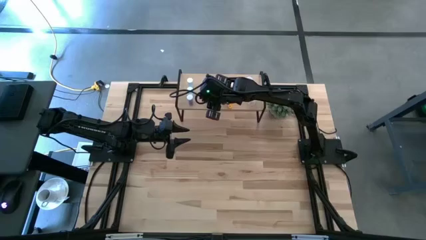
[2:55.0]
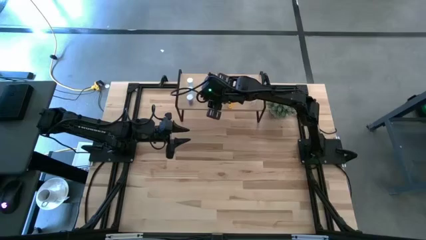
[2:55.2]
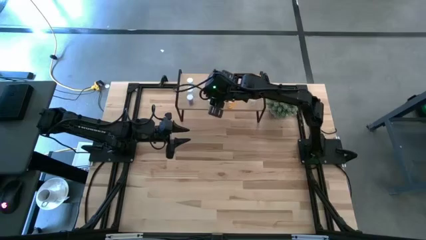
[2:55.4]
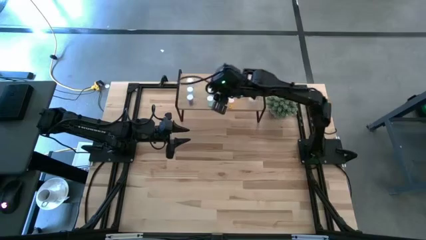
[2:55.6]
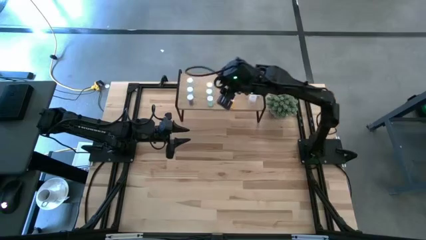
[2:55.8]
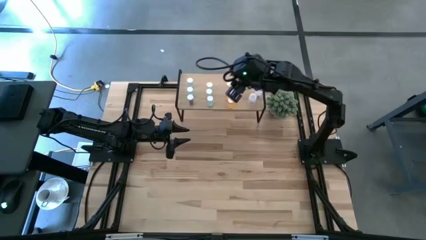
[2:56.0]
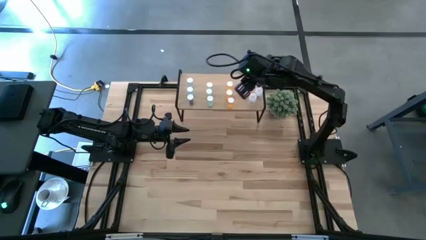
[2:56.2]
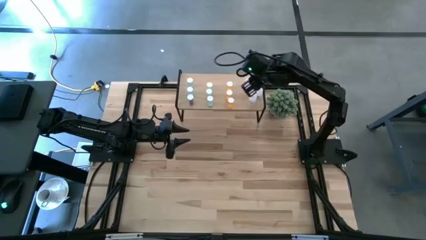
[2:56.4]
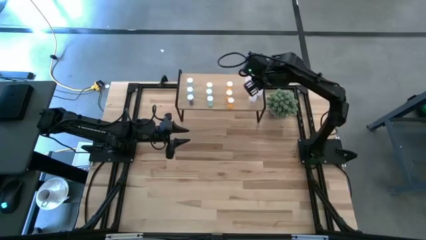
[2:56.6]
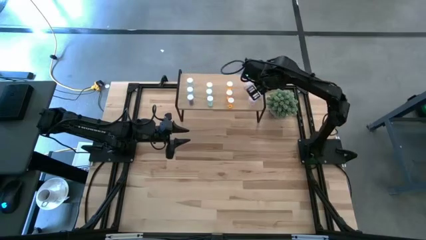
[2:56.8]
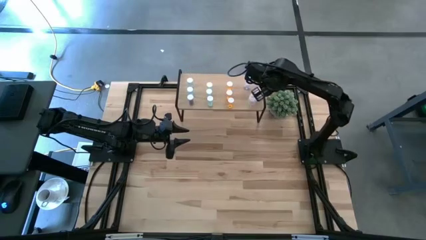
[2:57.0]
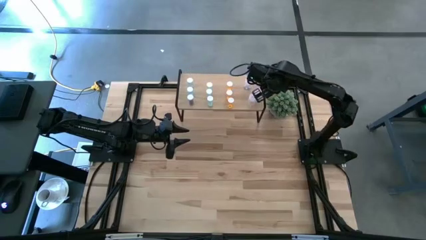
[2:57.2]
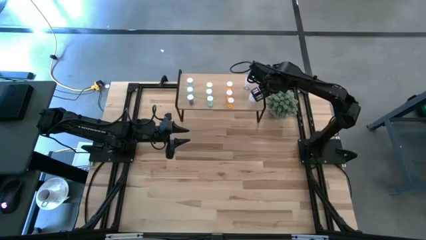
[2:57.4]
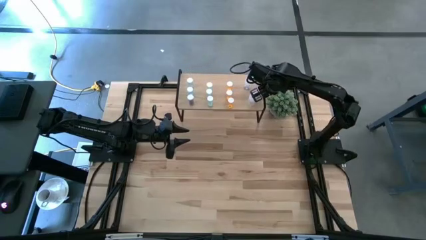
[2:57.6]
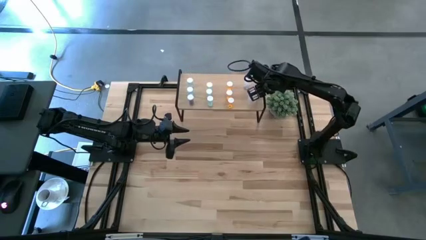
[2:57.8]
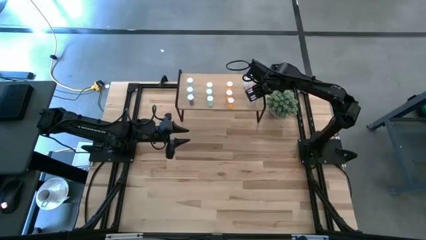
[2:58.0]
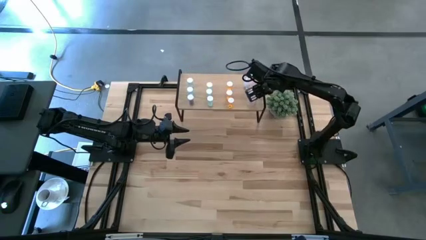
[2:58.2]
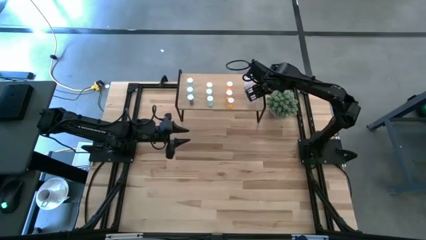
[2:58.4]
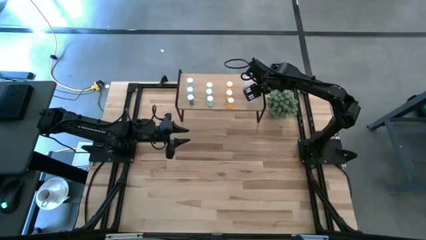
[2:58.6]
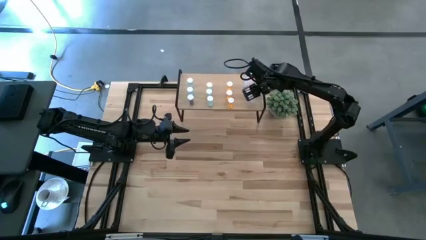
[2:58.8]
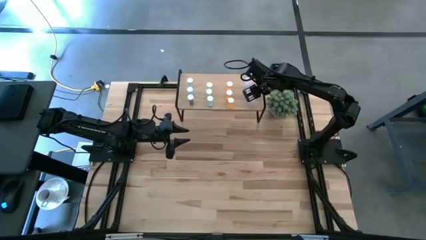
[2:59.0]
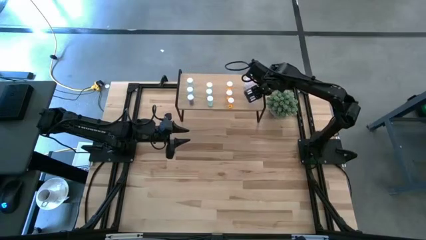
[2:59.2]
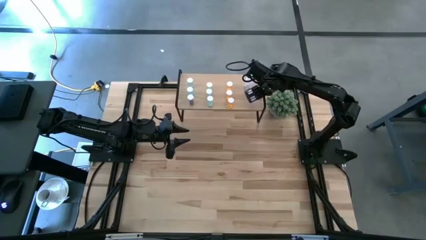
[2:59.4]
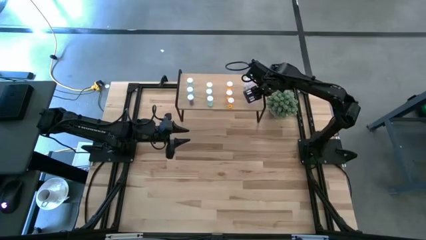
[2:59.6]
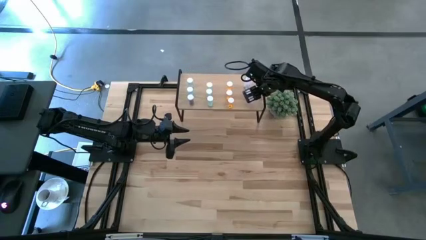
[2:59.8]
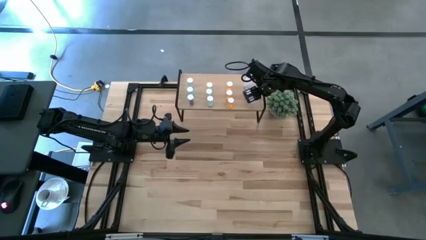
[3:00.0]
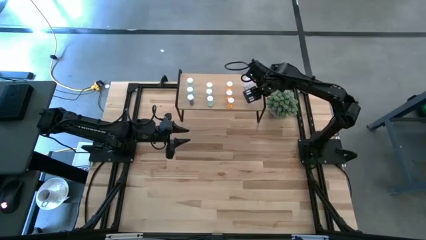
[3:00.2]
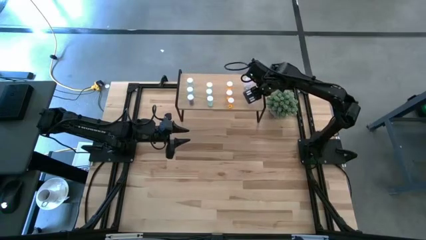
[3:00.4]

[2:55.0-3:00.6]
Task: Pick and place medicine bottles onto shelf by color
Adjust the transparent pill bottle on the shelf

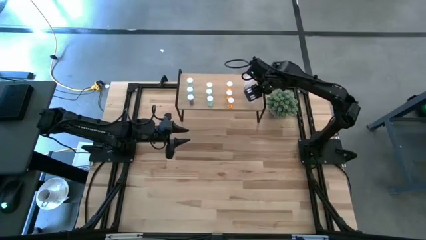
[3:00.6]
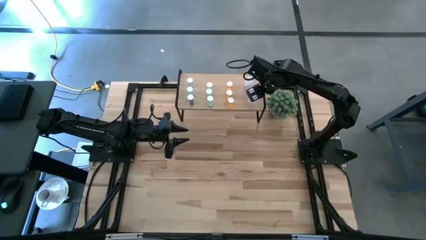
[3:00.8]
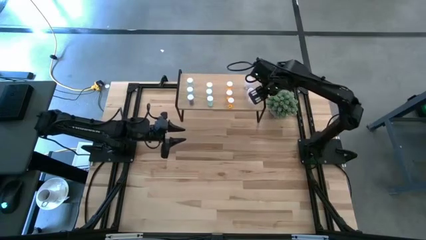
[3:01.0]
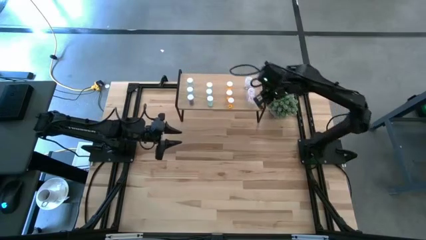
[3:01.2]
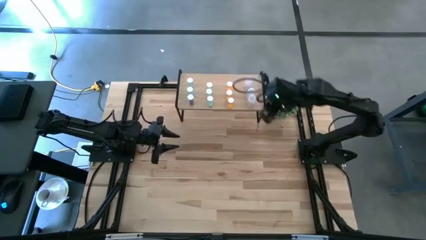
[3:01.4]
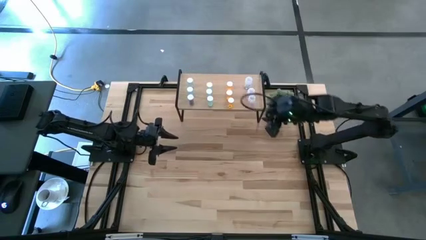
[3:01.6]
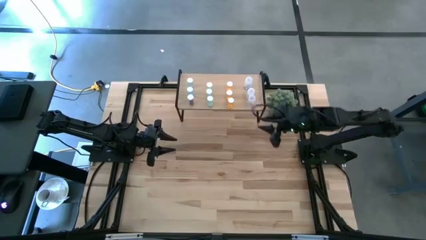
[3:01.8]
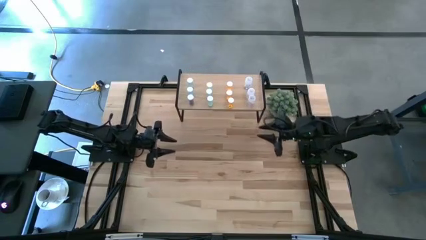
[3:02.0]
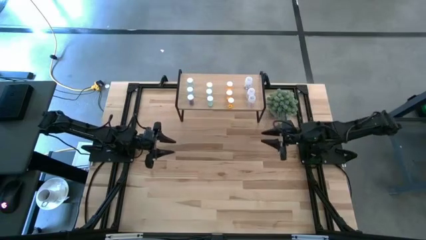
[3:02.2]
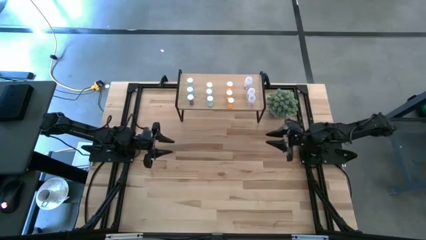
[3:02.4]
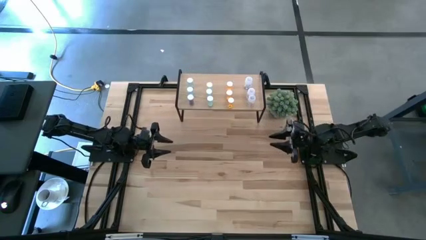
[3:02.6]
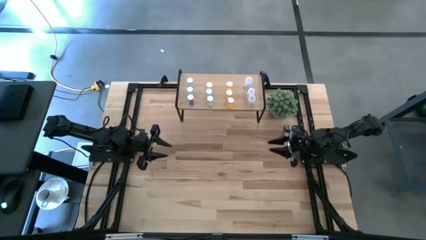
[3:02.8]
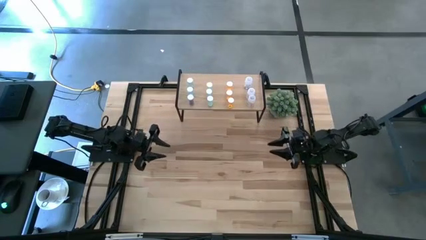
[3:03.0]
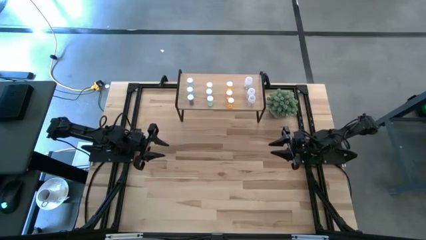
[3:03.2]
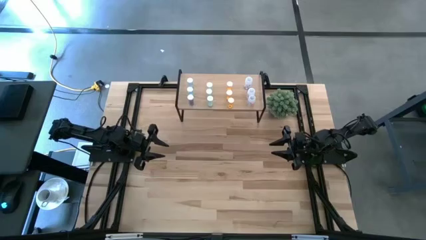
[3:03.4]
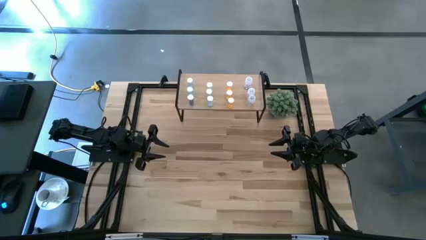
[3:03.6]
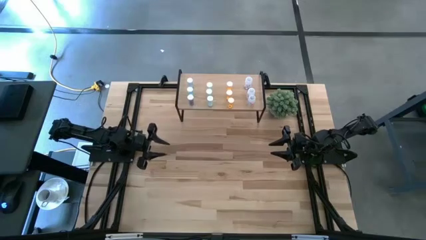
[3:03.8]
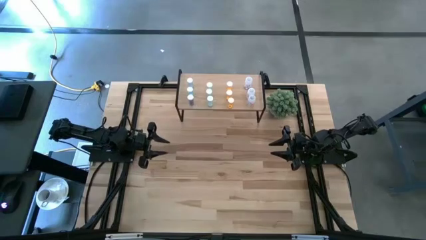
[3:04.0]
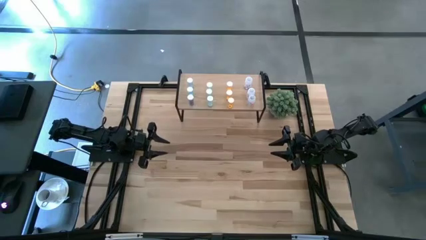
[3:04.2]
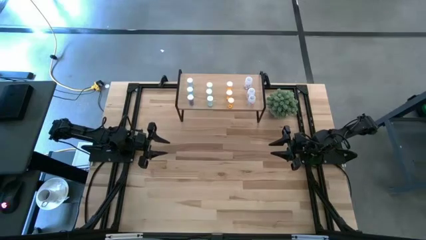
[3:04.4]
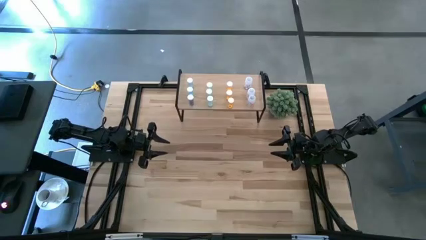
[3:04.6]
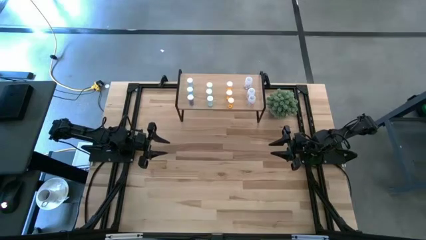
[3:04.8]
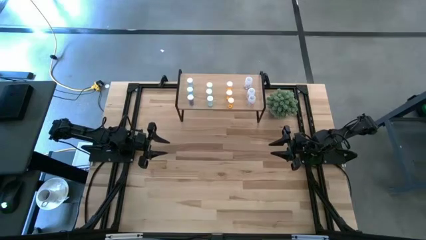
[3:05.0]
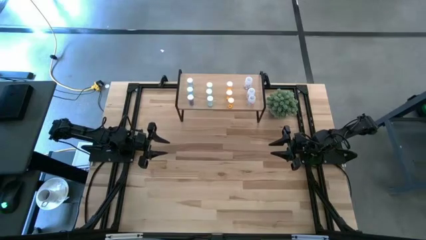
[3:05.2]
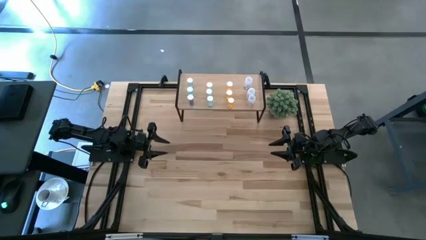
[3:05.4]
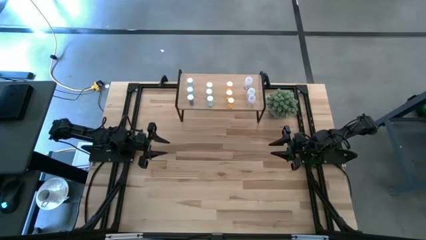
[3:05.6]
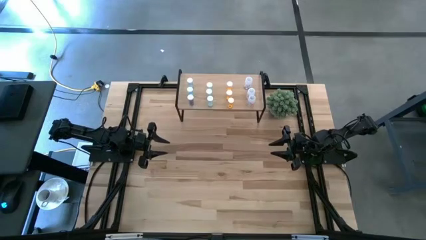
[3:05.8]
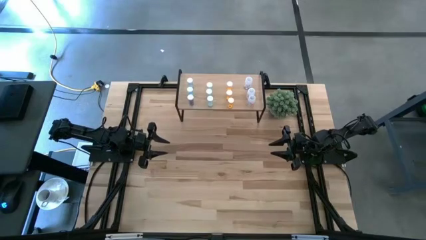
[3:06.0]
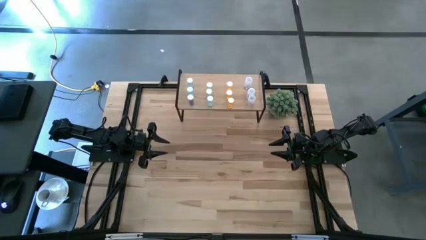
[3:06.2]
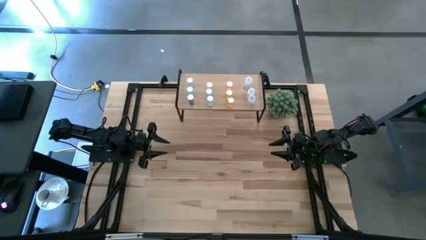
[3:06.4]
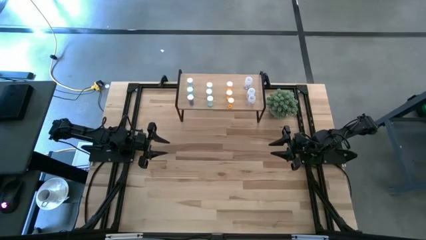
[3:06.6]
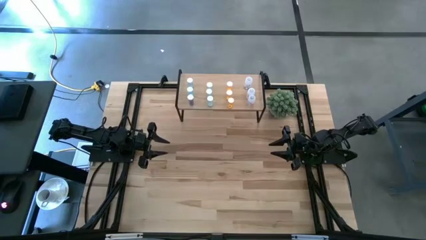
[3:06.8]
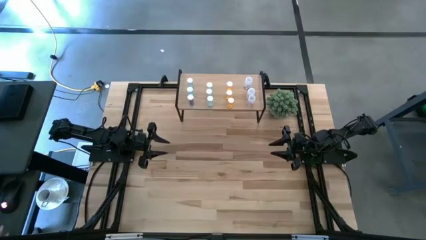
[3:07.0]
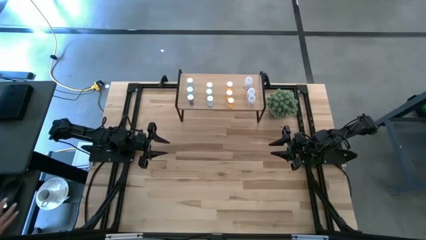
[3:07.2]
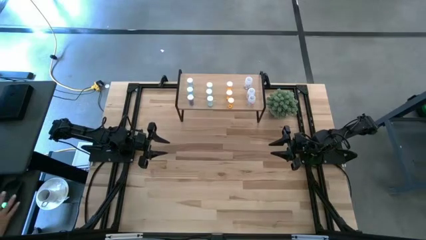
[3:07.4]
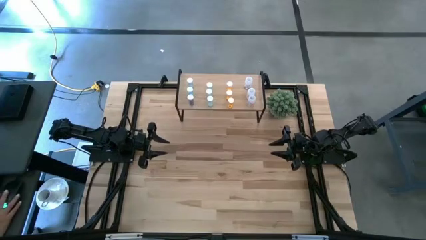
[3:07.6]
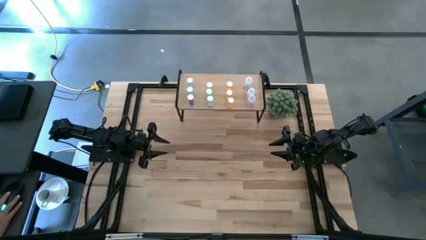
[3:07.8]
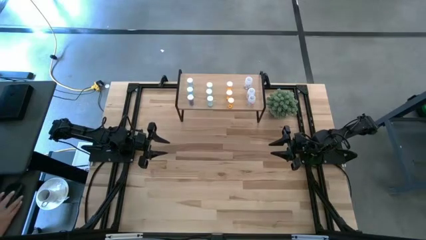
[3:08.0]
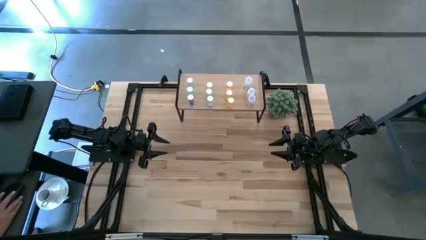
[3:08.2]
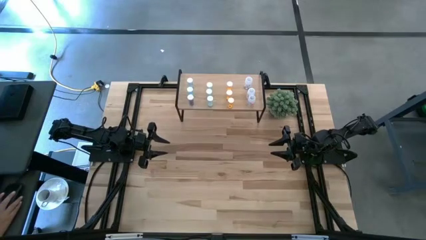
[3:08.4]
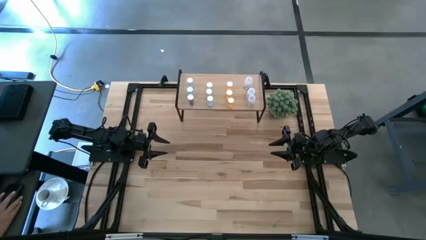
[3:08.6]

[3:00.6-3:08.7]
Return To Home Position

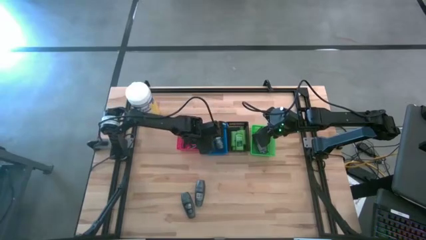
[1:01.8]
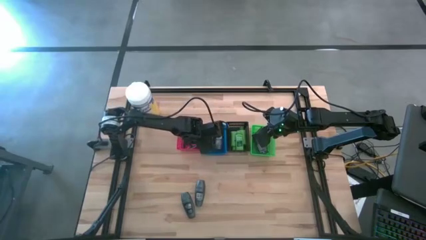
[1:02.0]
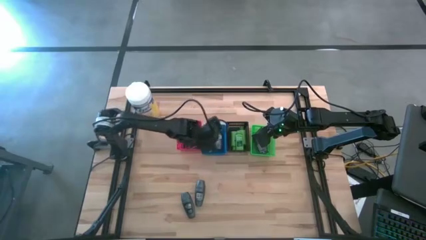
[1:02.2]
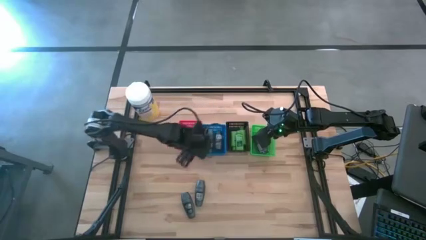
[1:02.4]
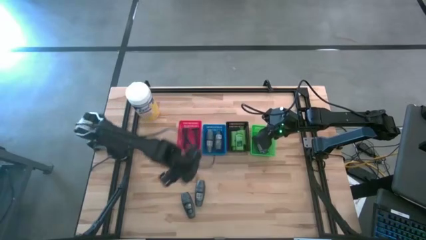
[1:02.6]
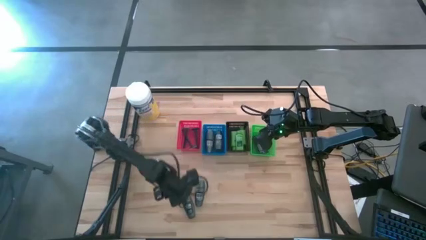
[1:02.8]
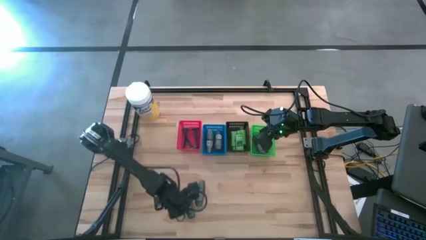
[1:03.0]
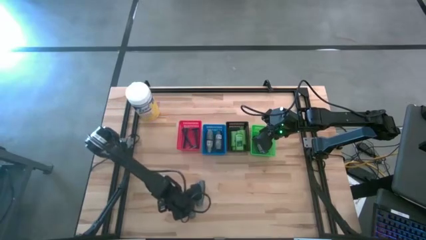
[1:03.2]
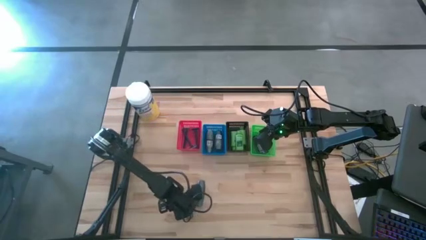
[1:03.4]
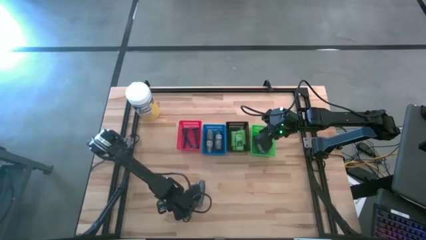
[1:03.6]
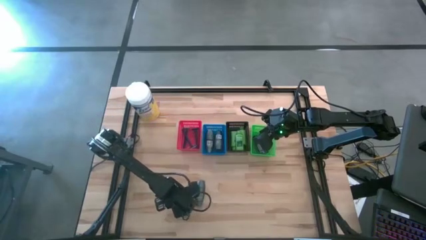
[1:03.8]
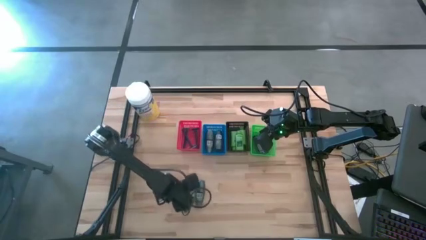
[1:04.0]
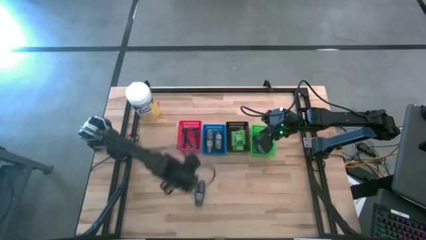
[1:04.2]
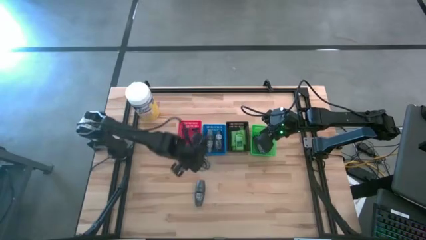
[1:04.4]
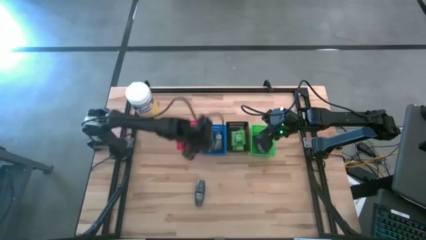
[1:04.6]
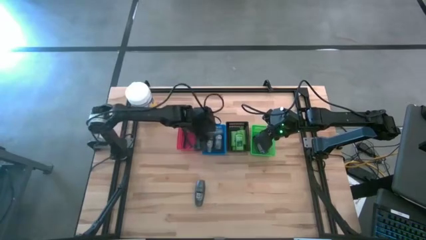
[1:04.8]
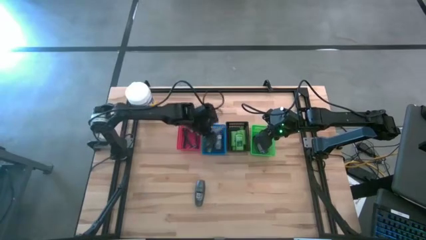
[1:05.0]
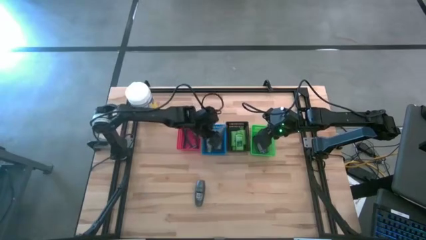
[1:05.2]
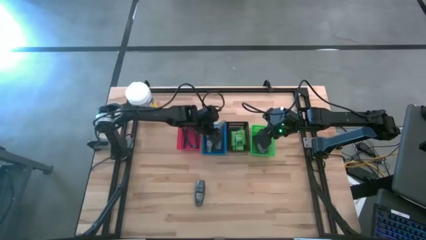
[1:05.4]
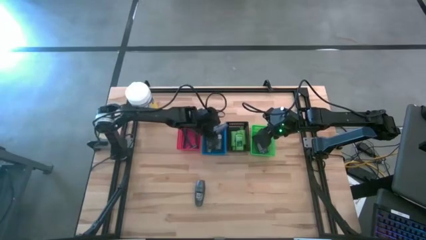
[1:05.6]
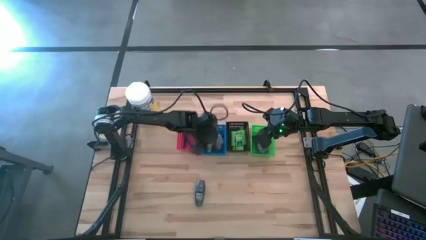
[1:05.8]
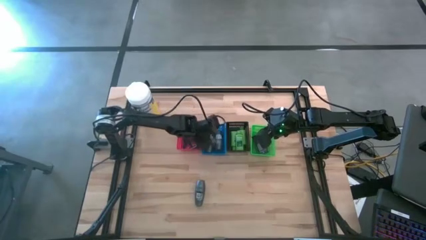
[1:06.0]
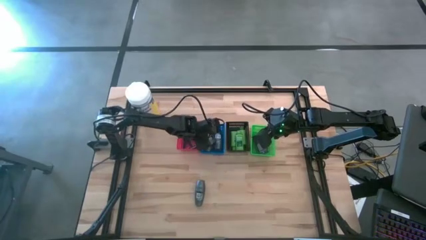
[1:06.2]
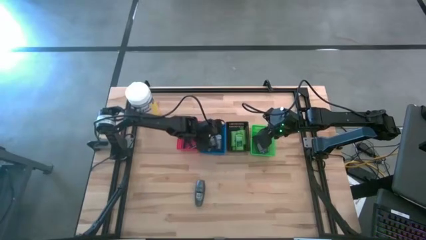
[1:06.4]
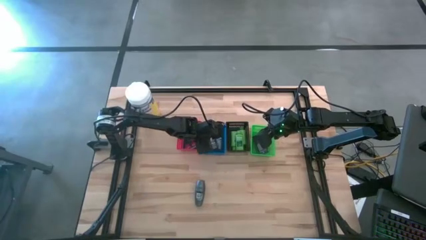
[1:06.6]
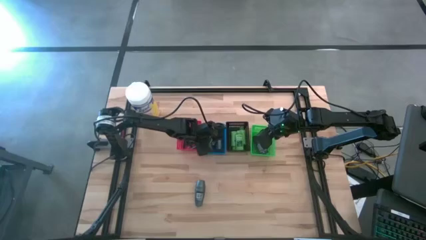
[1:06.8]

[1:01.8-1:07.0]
Task: Pick & Place Travel size toiletries
Put the deodorant into the blue basket
